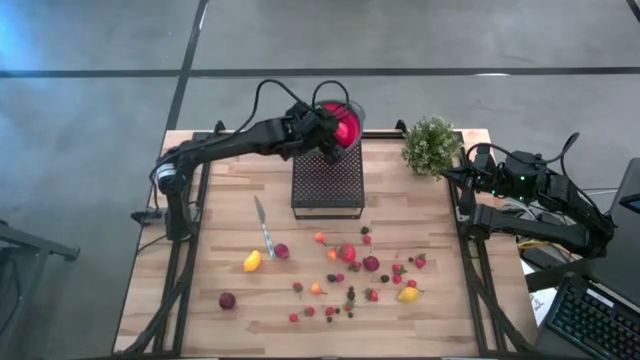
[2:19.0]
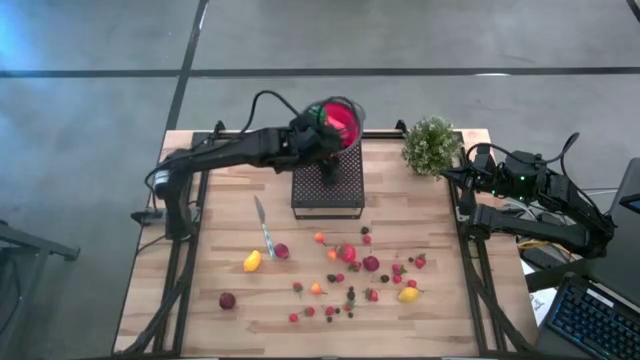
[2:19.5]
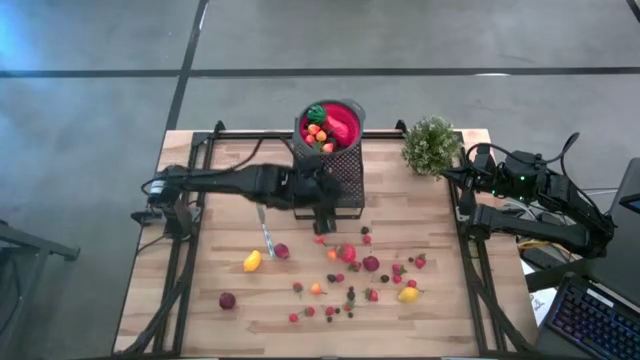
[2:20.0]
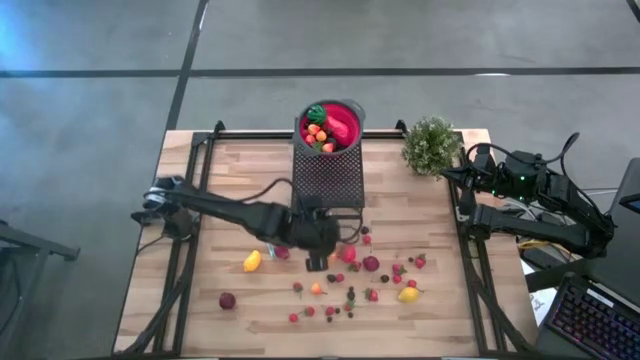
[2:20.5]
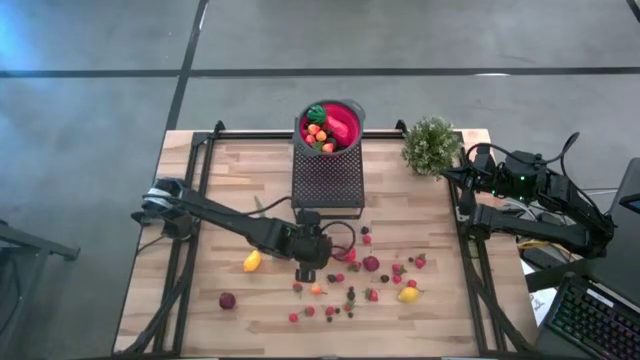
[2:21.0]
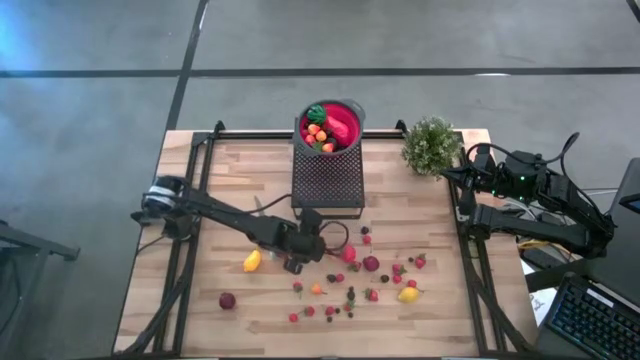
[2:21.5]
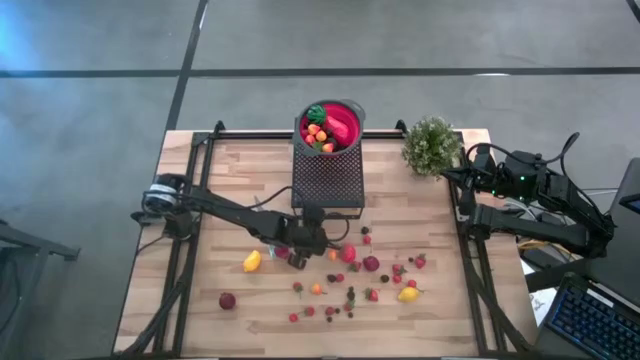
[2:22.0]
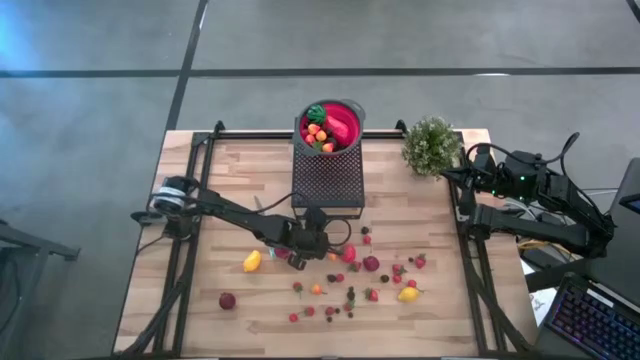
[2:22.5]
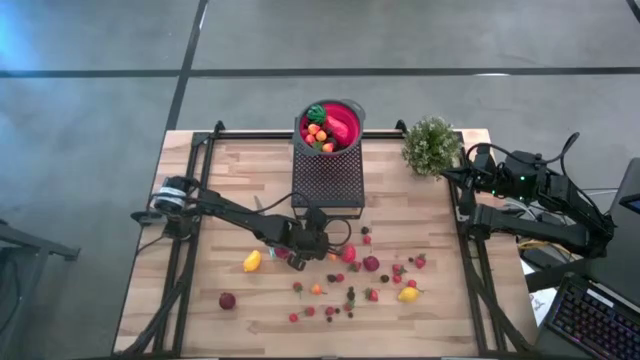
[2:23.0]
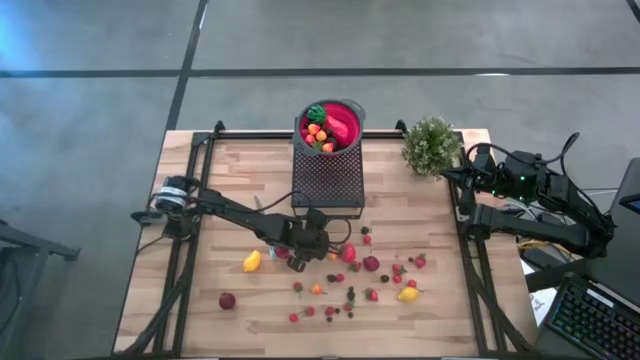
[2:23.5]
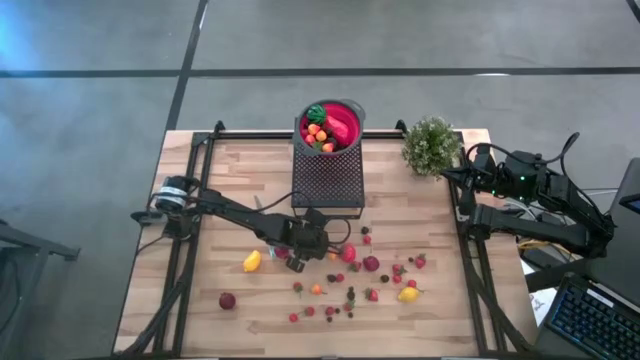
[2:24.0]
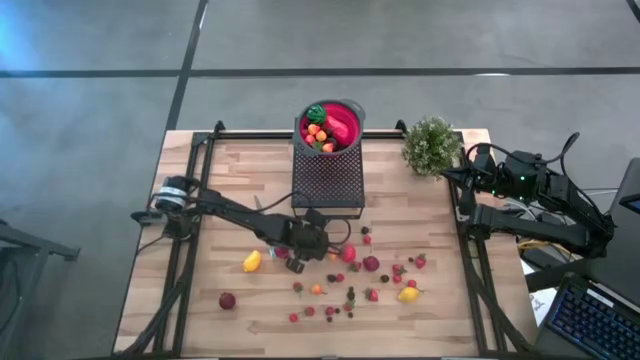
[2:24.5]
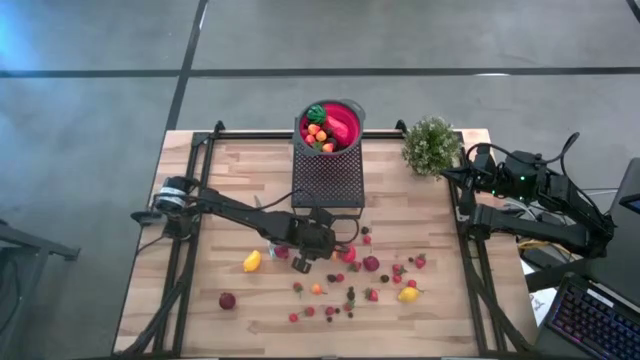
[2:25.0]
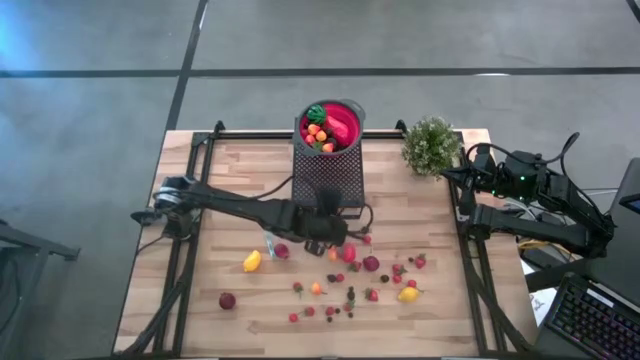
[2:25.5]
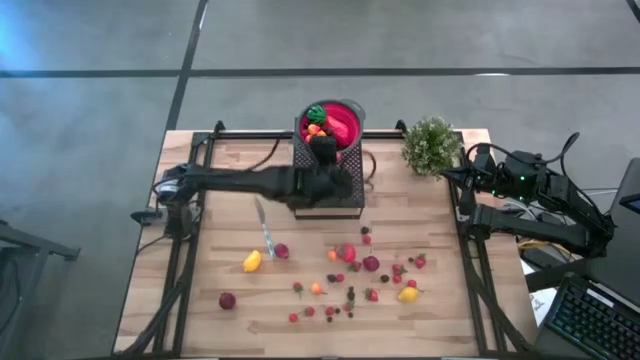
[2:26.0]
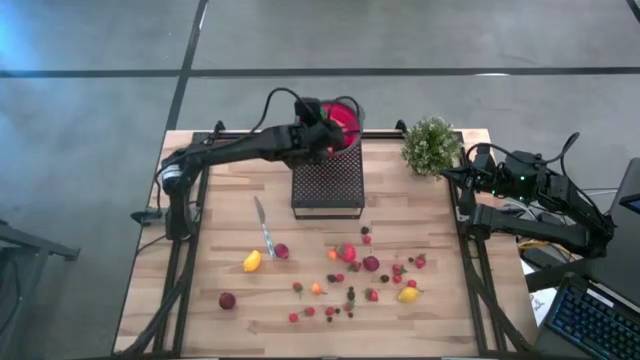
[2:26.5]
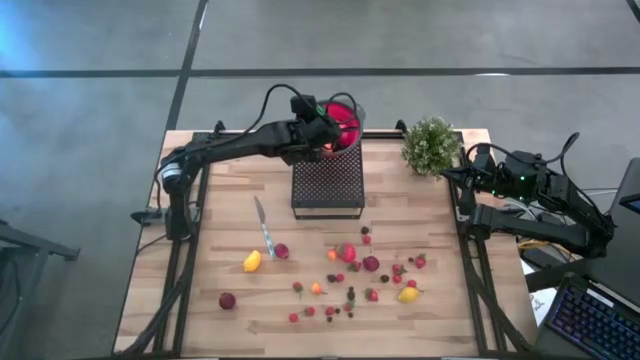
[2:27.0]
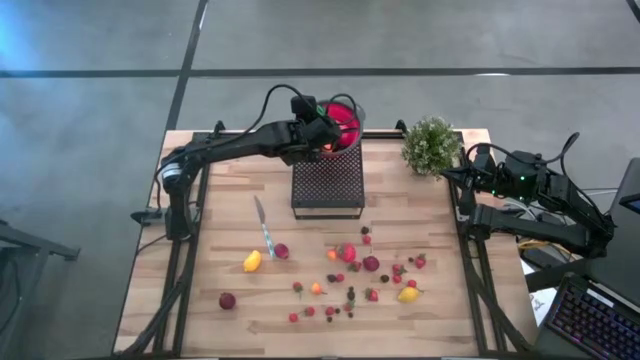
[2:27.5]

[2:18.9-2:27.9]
Task: Pick & Place Fruit
Put the top pear into the strainer bowl on the shelf

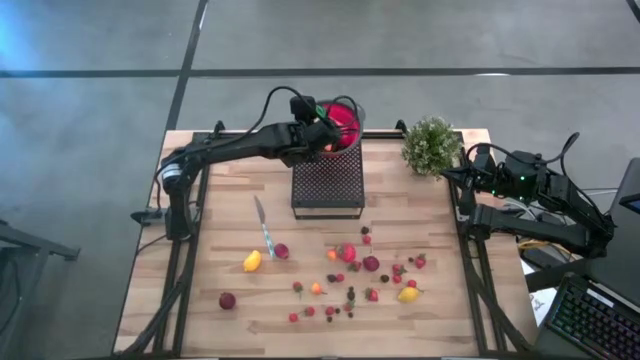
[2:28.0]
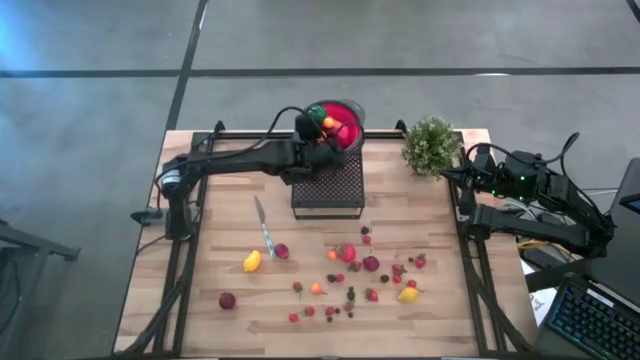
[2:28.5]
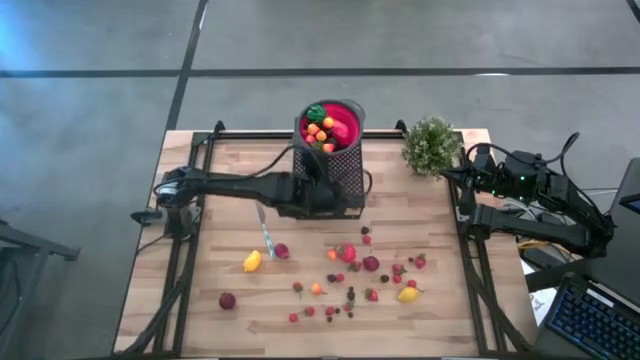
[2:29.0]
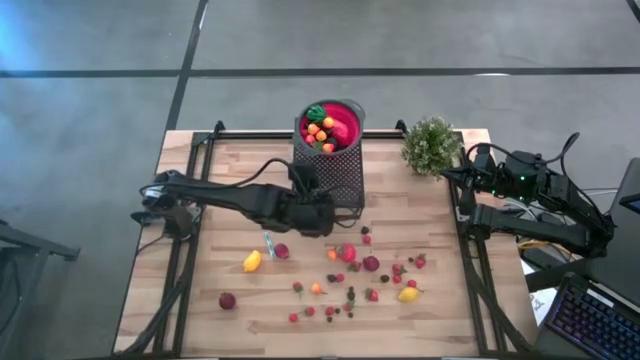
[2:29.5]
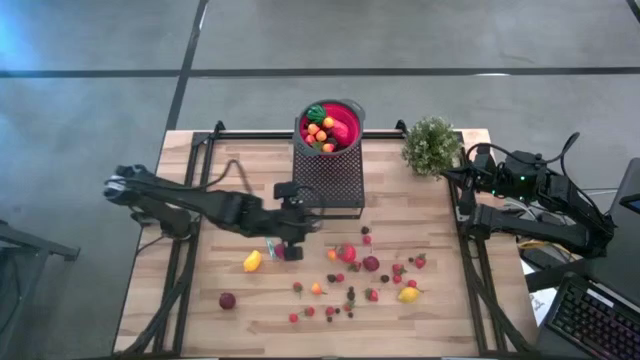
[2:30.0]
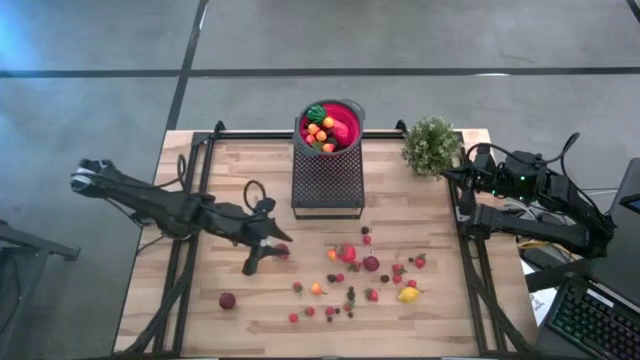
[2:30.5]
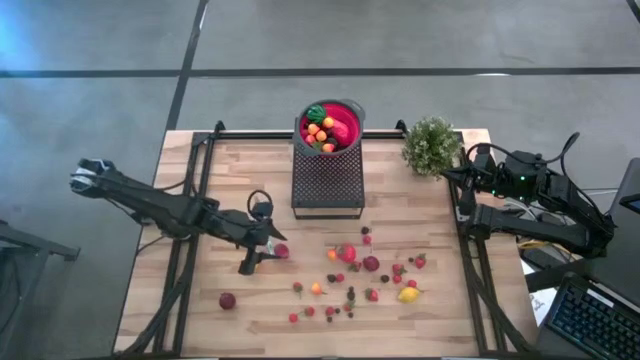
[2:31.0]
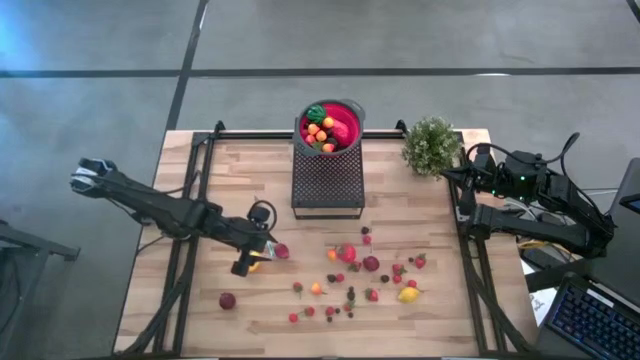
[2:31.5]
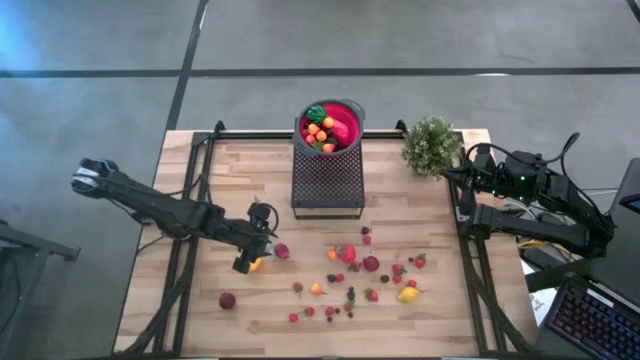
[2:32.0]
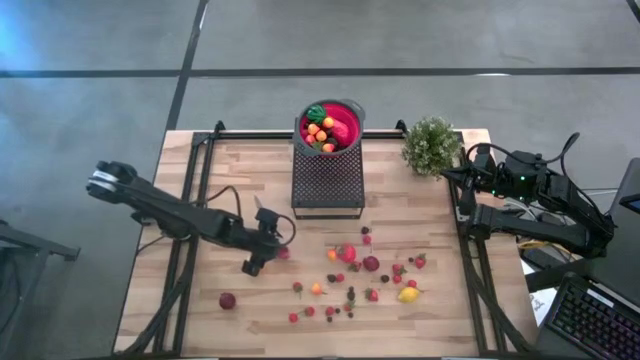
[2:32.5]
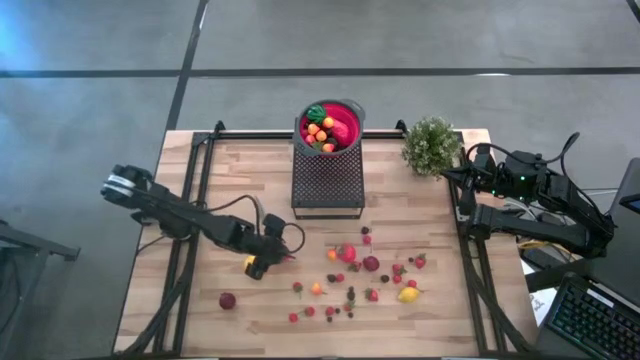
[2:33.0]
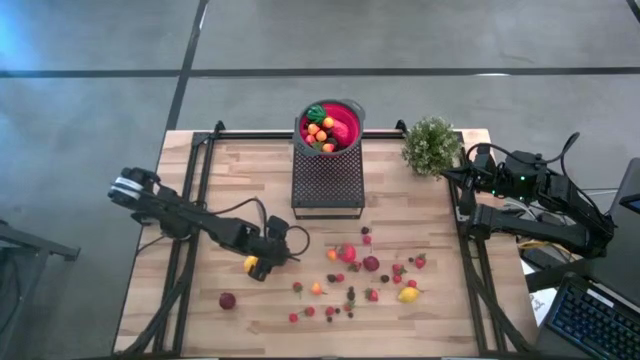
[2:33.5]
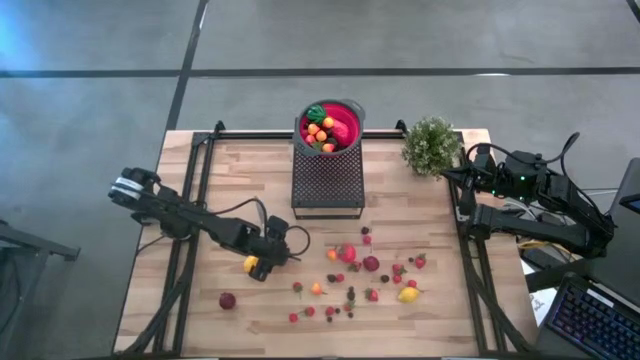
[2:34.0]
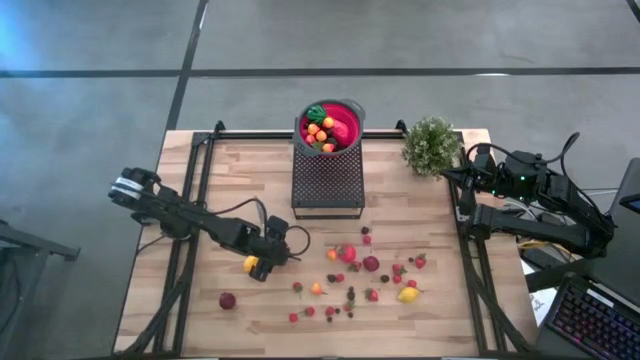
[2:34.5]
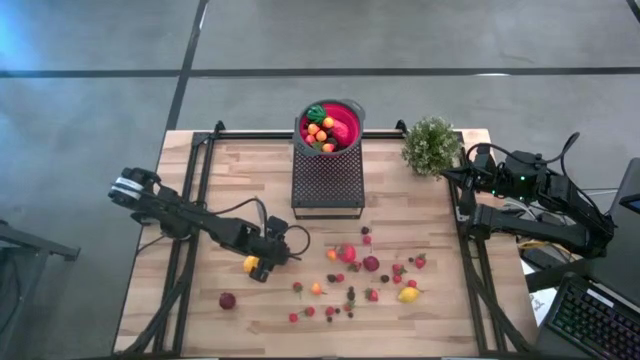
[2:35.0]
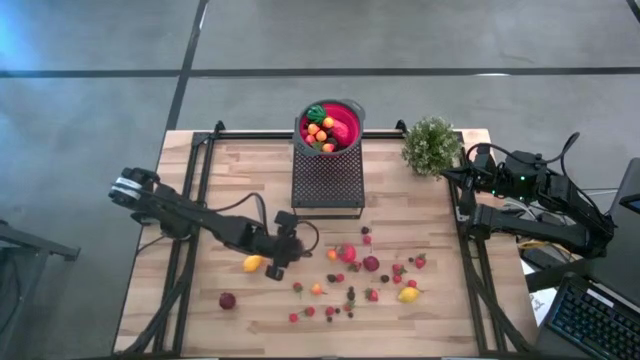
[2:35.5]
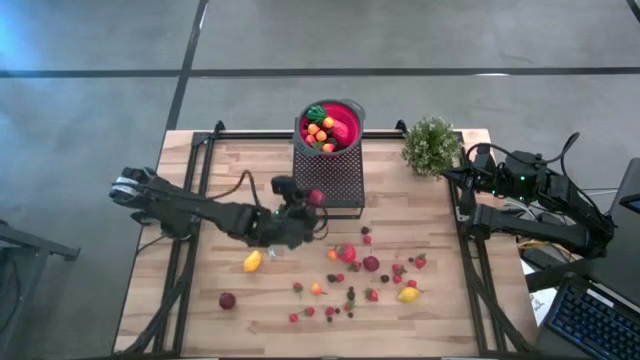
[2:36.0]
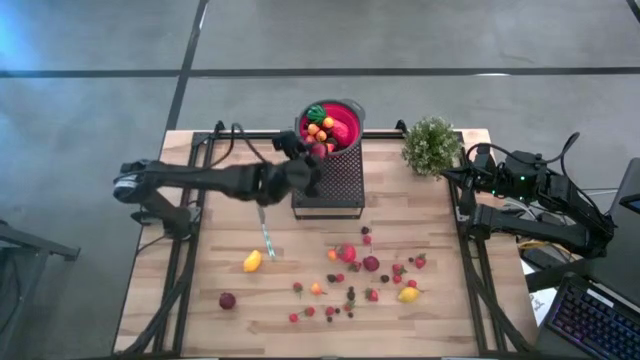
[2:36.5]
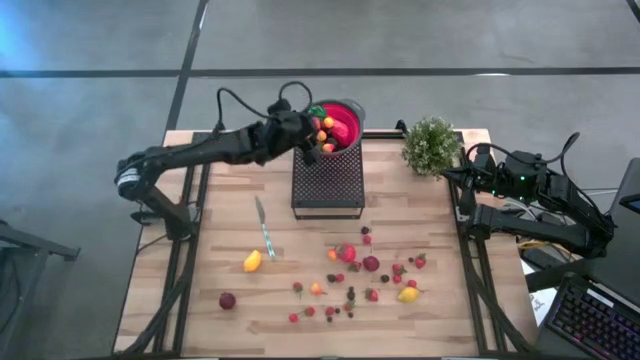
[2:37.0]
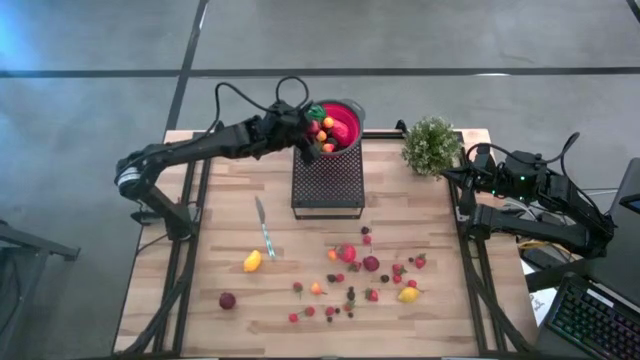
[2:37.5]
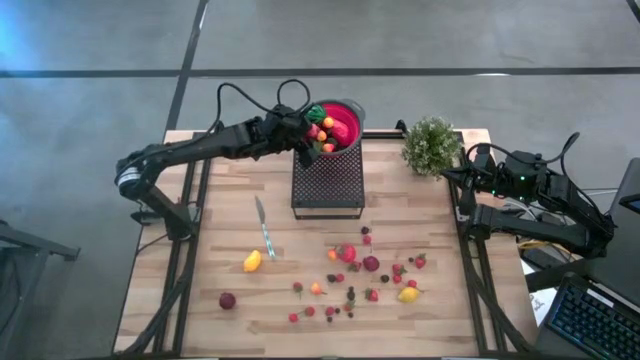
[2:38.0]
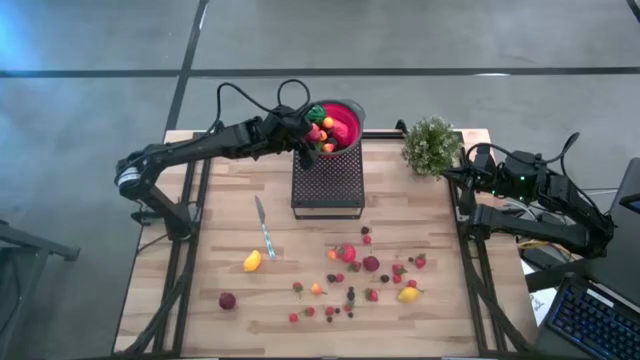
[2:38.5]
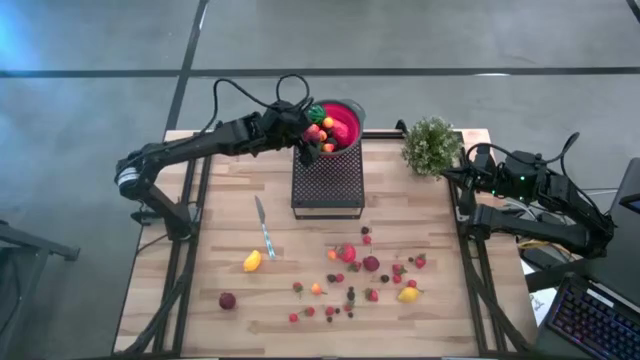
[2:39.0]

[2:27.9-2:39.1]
Put the middle pomegranate into the strainer bowl on the shelf
